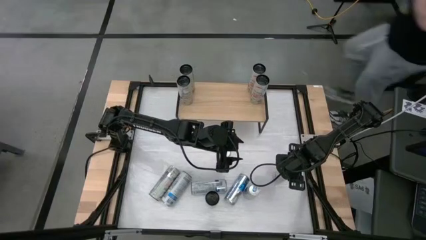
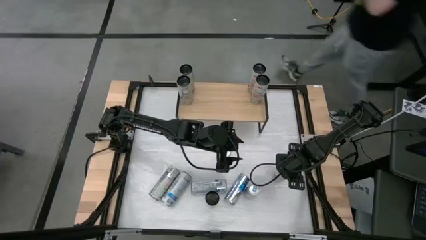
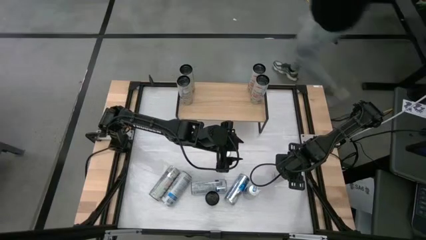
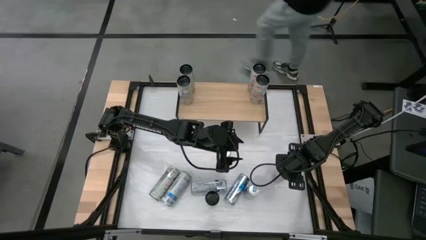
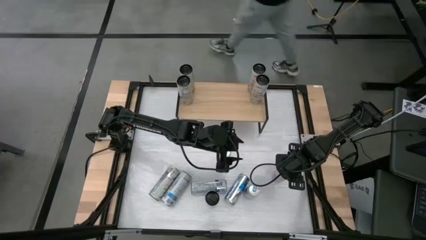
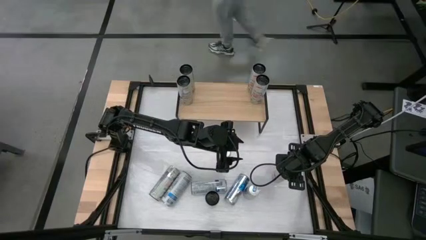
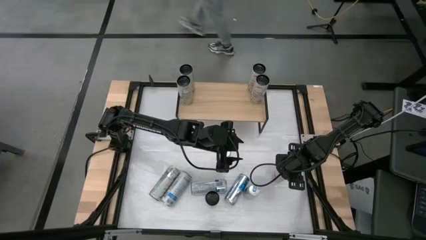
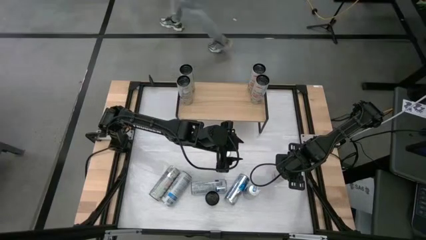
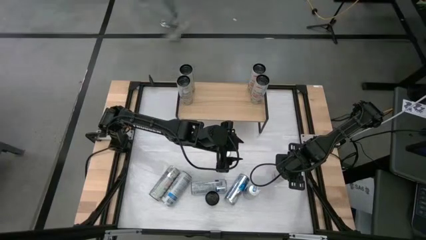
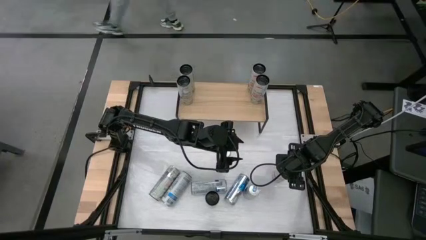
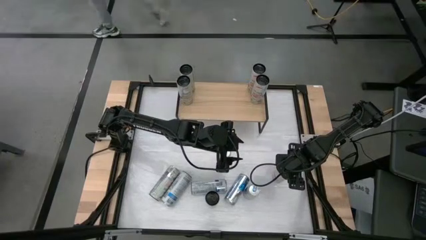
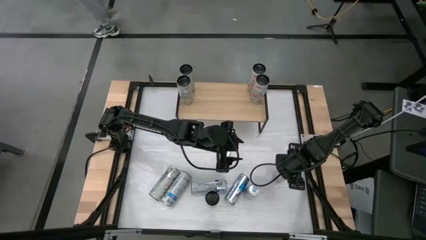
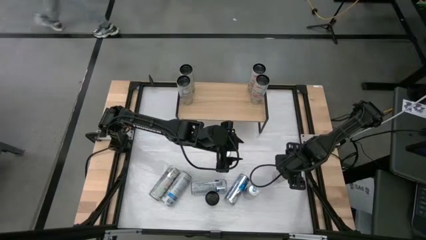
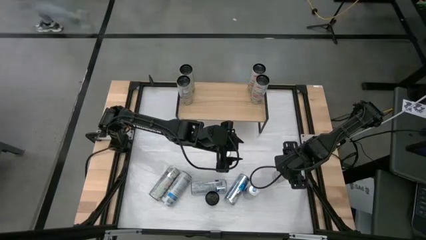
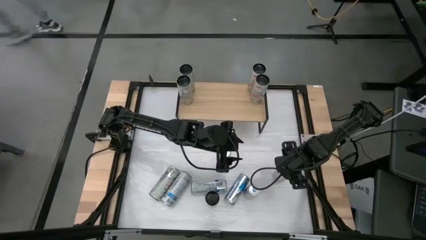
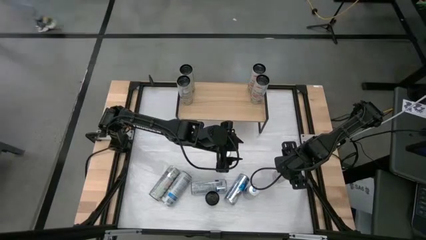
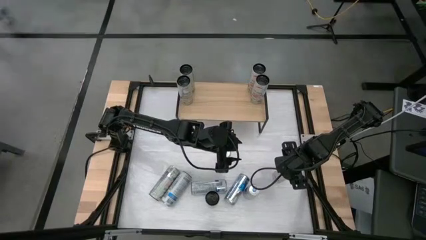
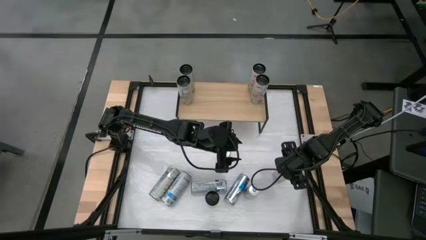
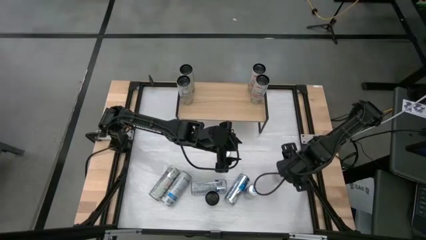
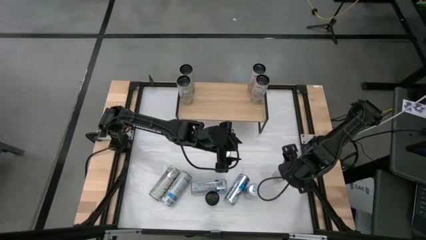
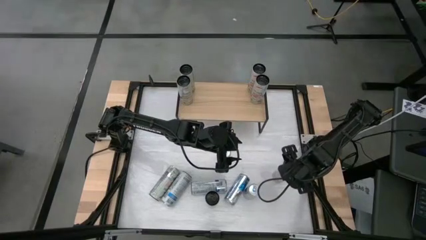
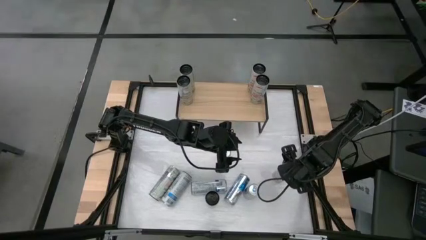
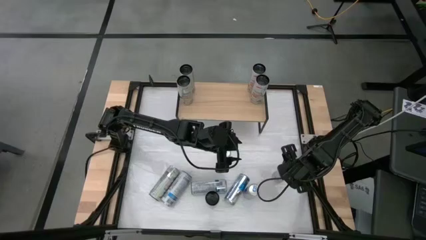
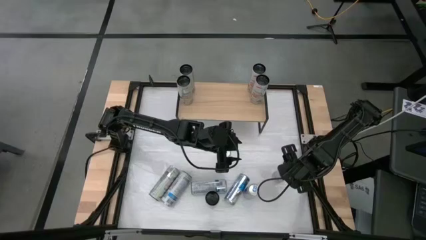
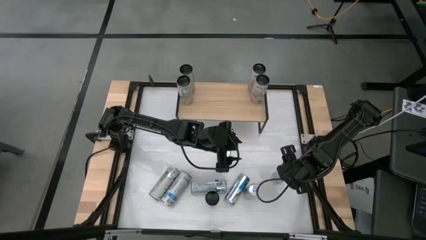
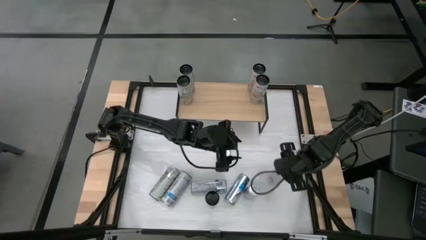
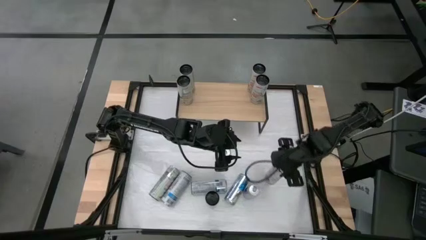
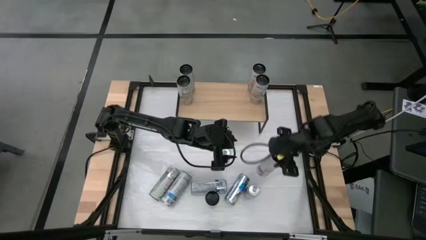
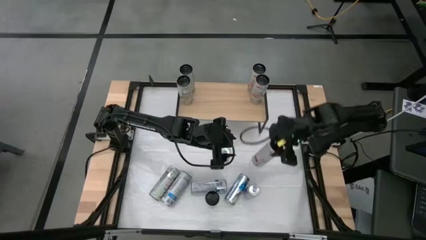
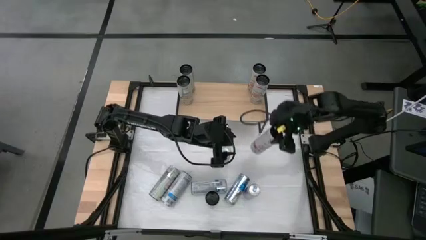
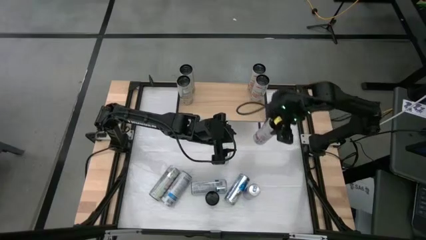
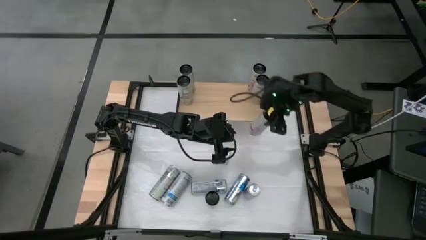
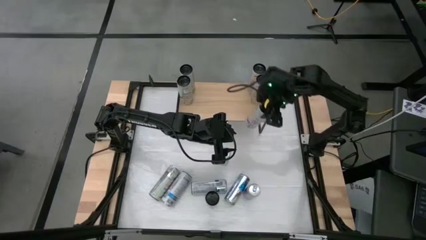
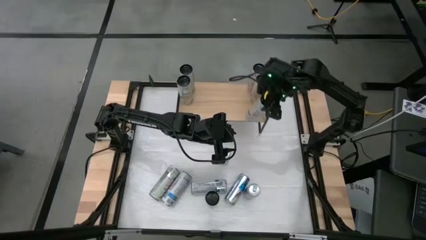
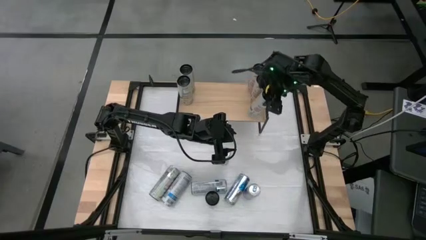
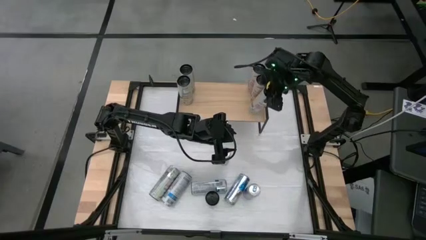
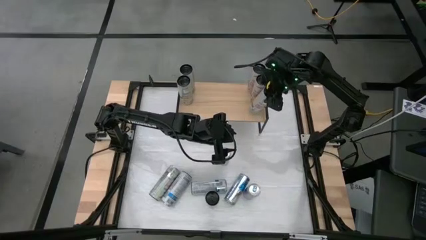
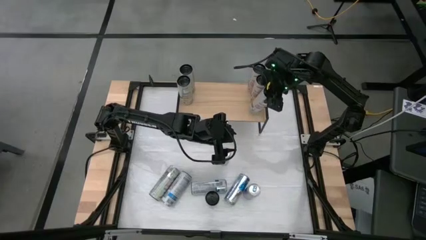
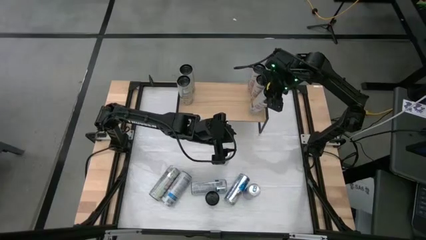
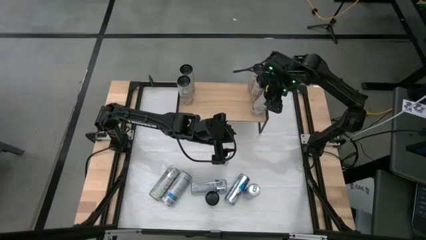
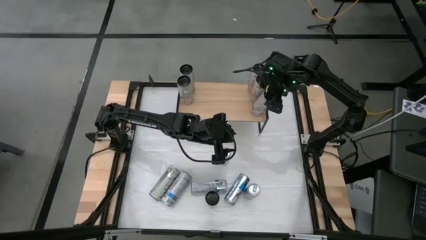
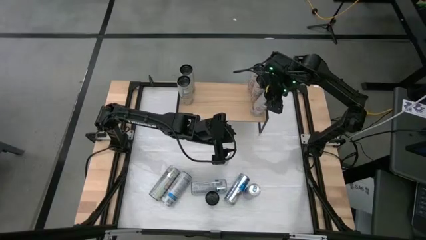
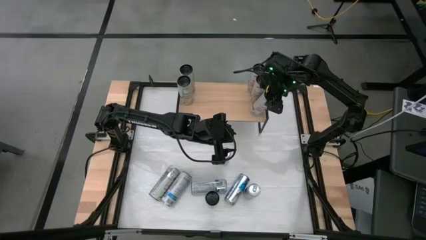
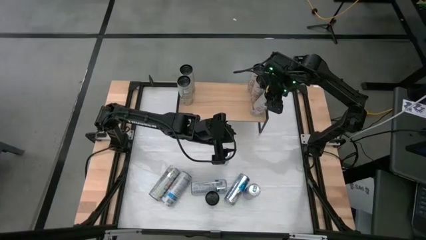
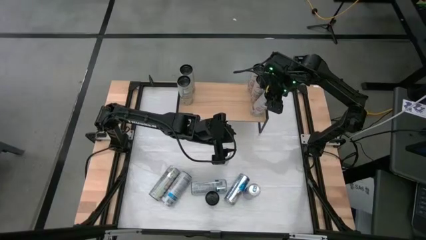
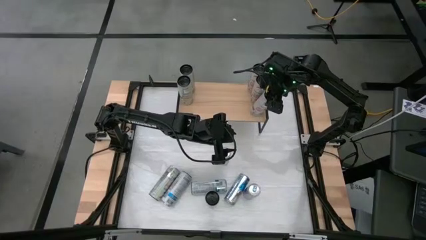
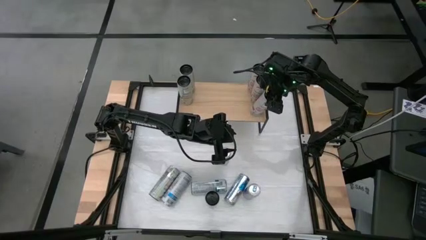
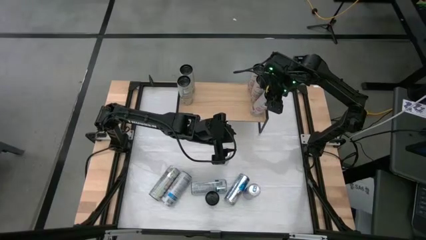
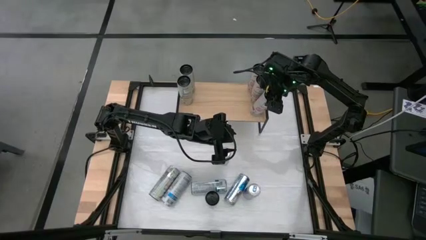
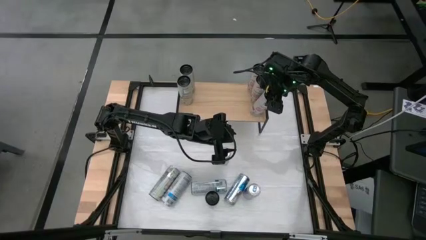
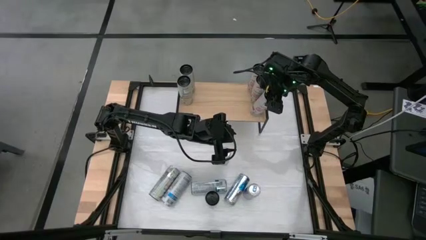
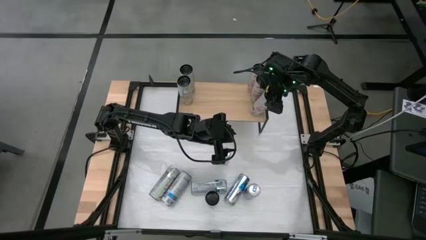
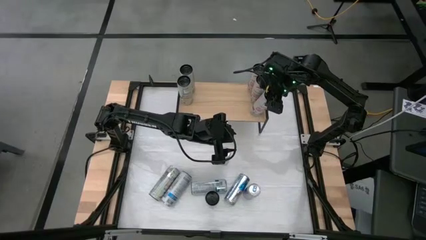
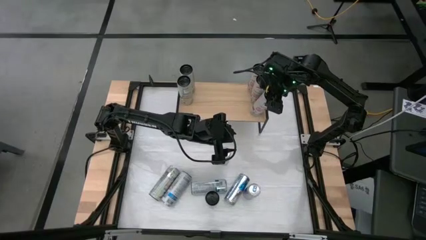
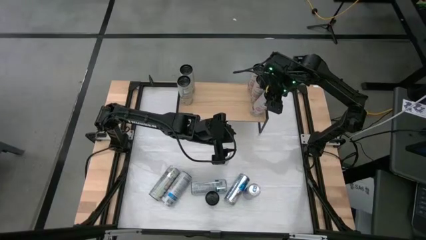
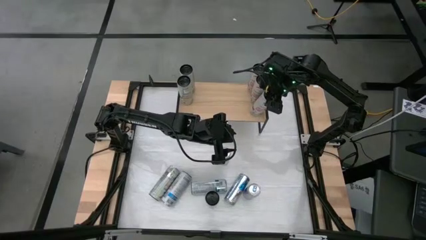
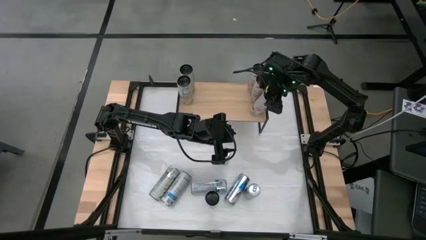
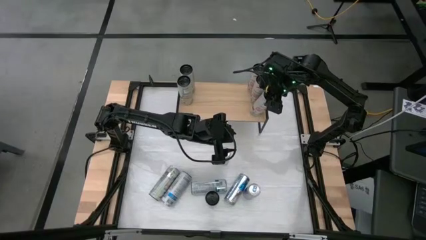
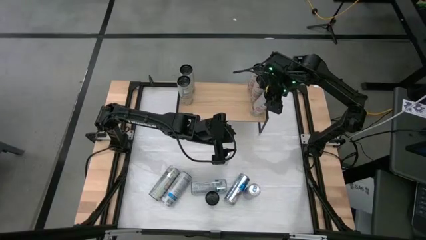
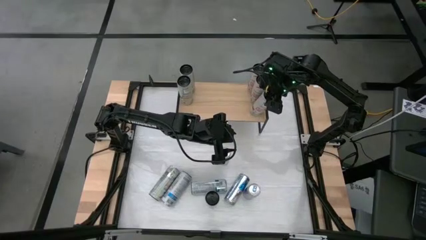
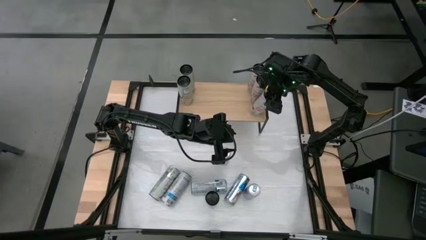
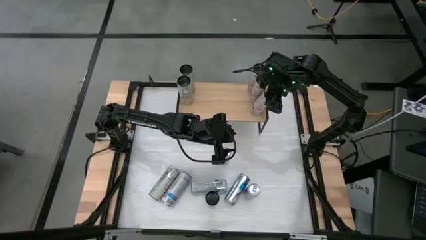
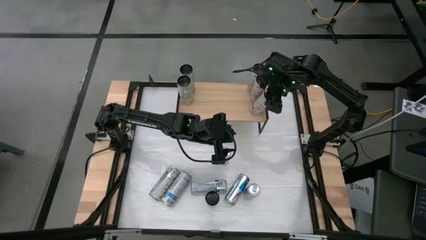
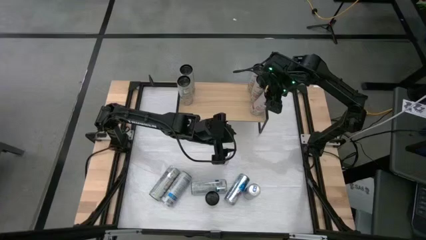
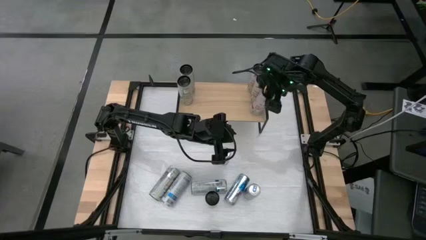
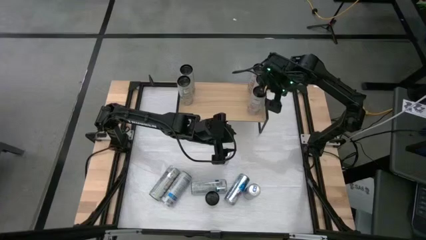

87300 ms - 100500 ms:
Task: Sort soda cans
Put the white pink soda can on the shelf and align with other white pink soda cans

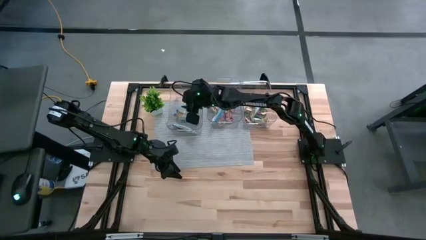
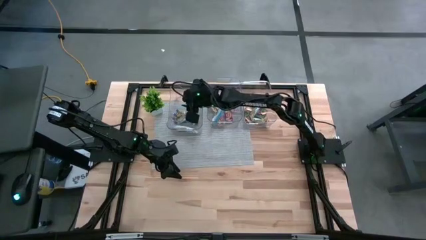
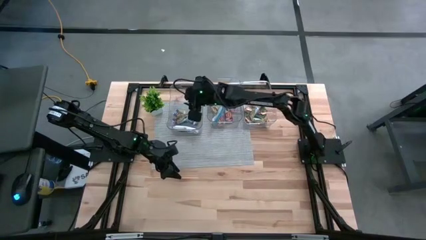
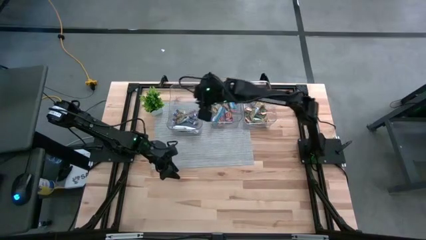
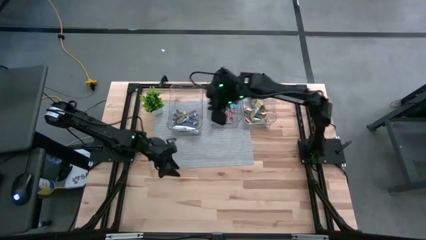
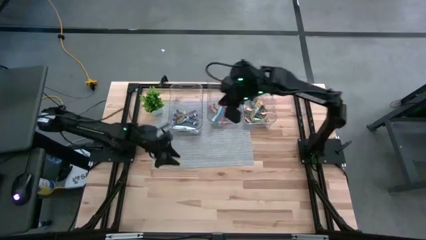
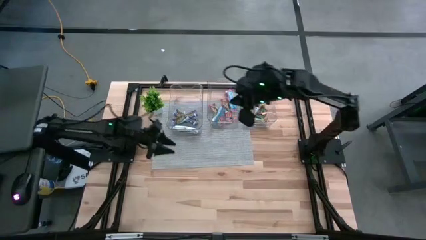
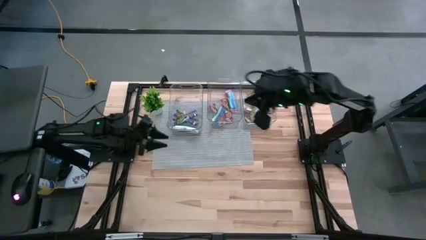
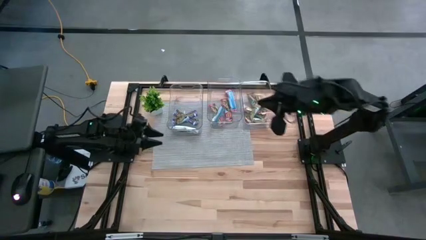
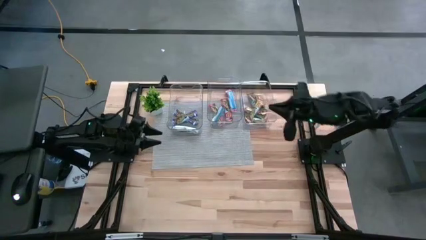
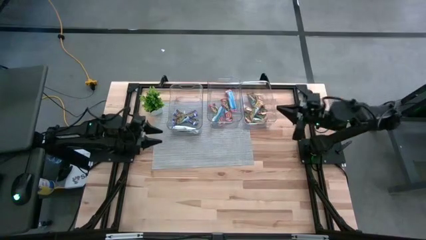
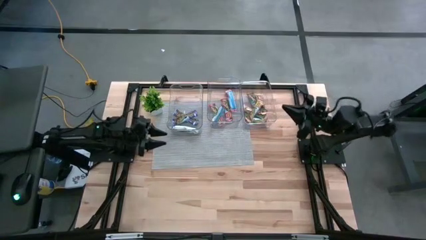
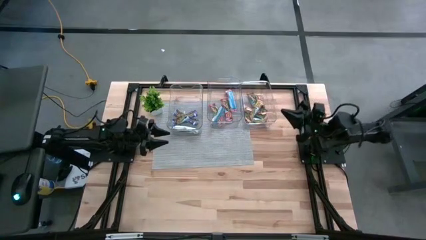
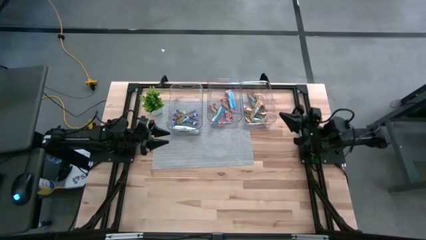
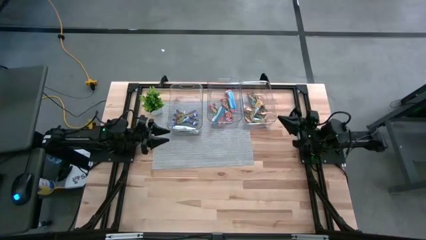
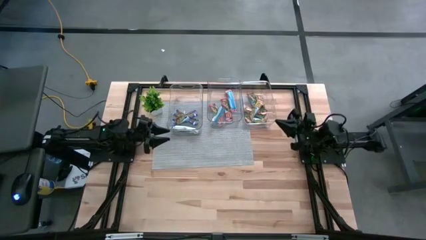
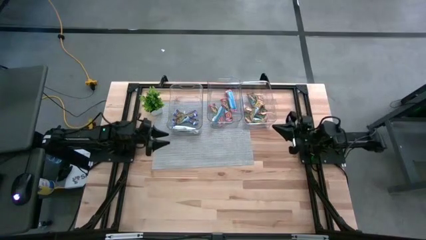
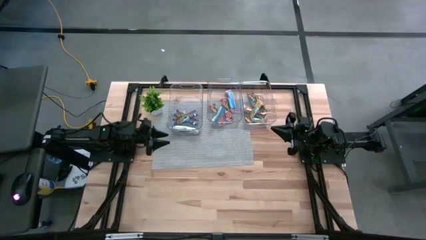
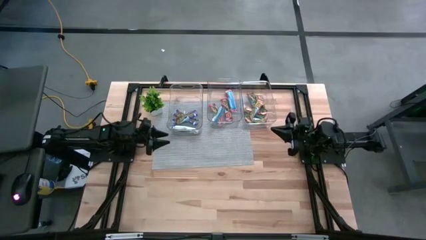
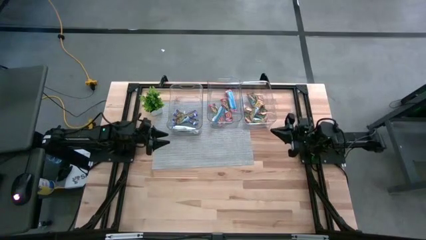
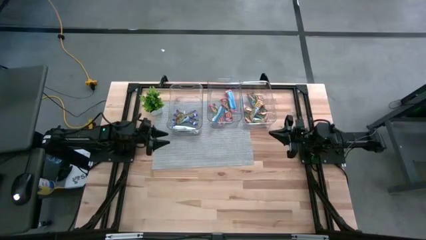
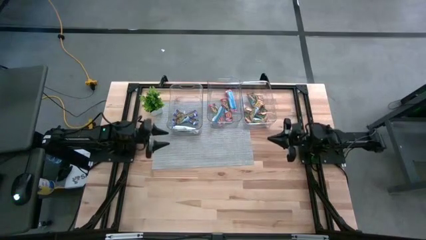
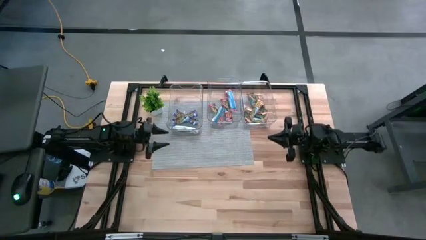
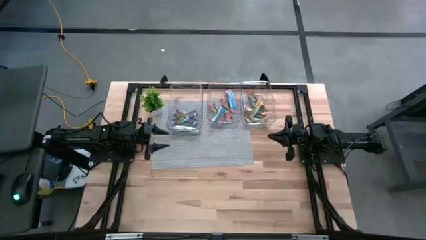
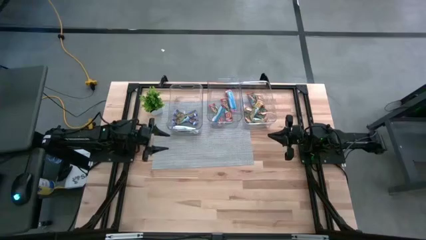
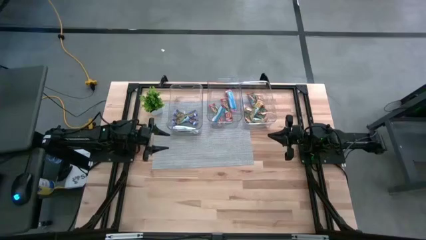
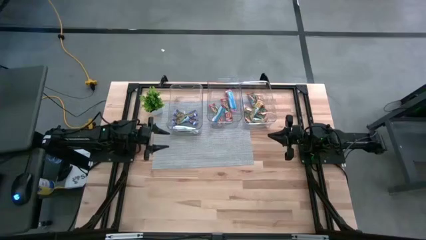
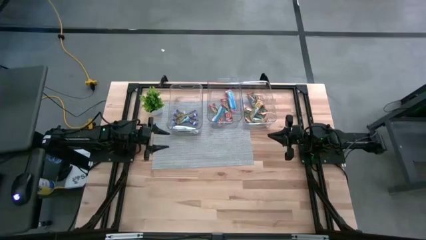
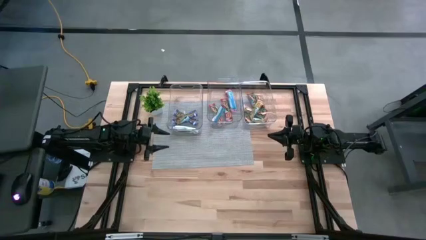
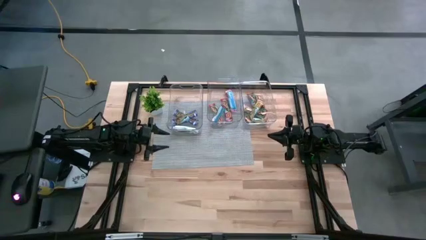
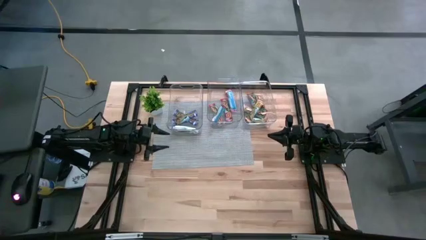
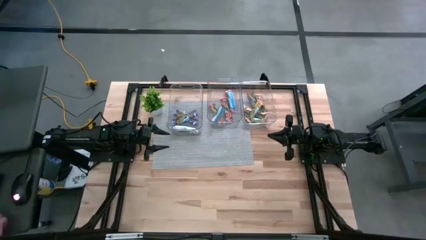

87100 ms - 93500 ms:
Task: Pick and place Granola Bars by type
Return to Home Position
